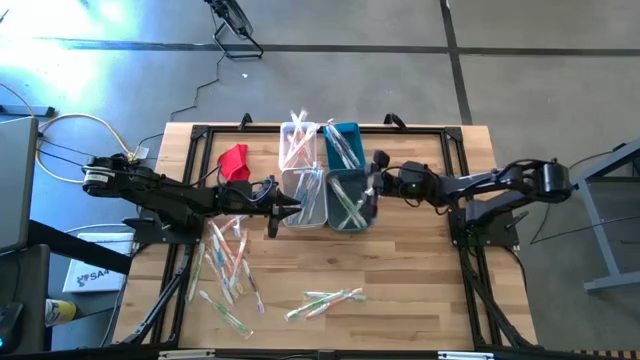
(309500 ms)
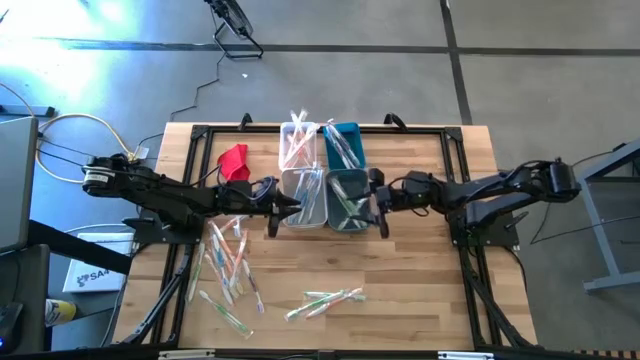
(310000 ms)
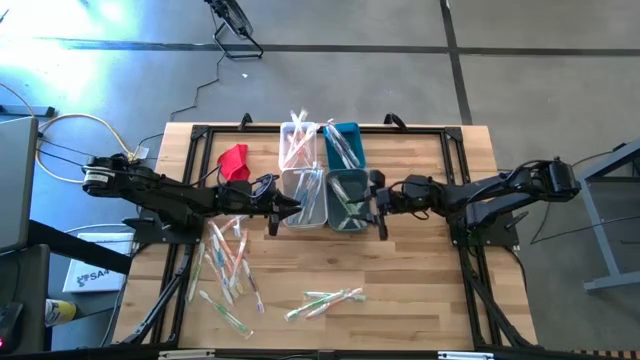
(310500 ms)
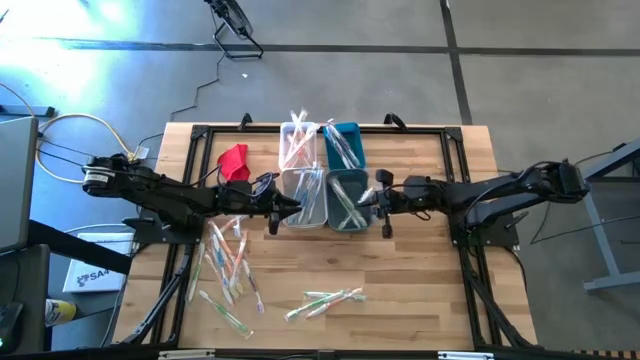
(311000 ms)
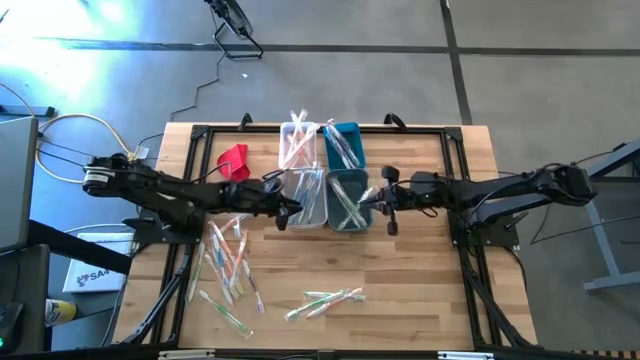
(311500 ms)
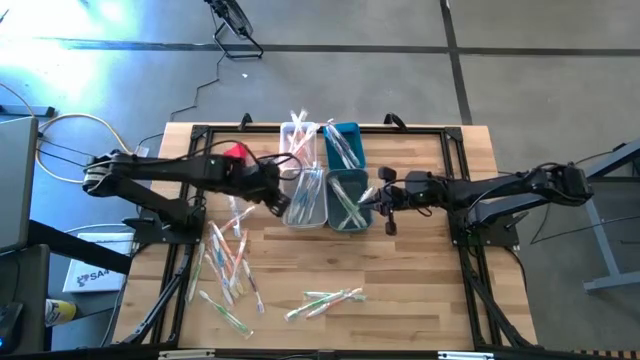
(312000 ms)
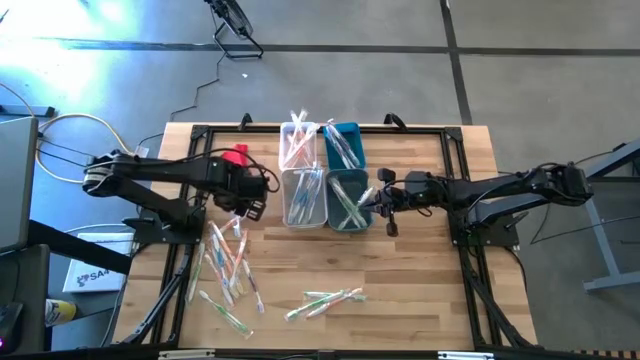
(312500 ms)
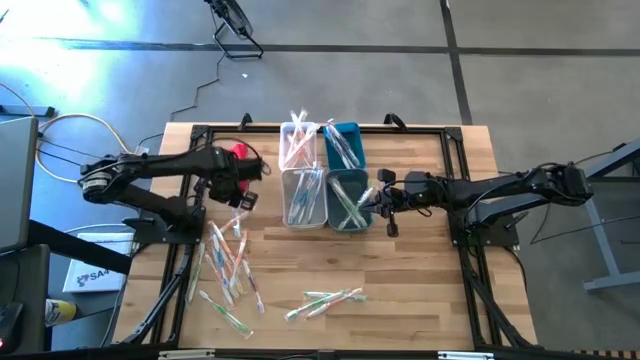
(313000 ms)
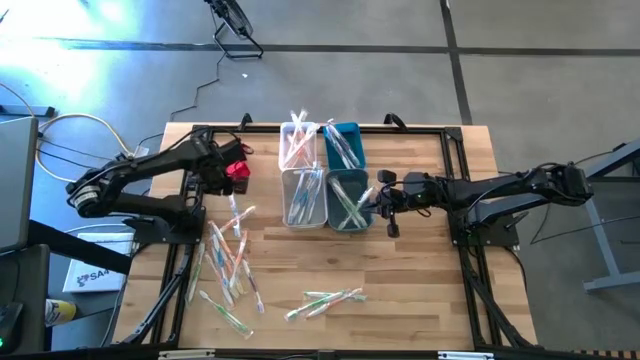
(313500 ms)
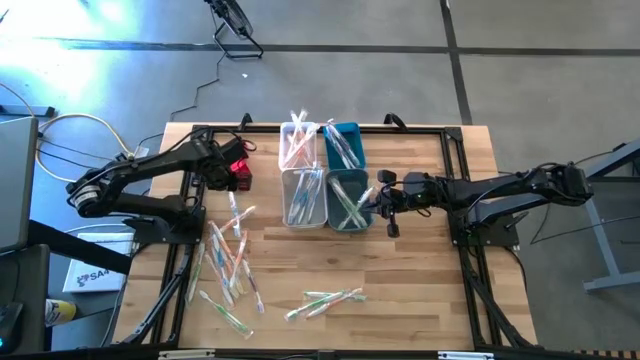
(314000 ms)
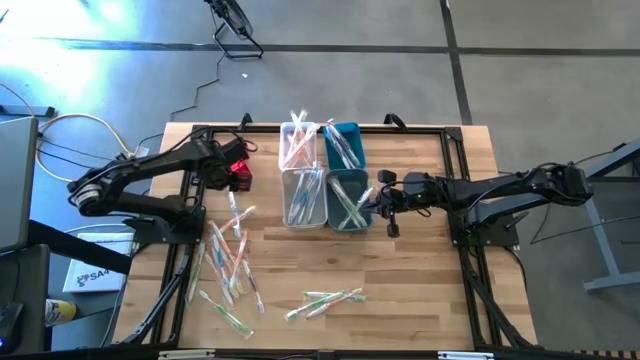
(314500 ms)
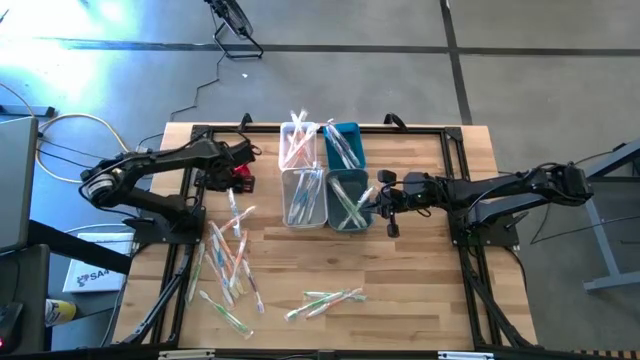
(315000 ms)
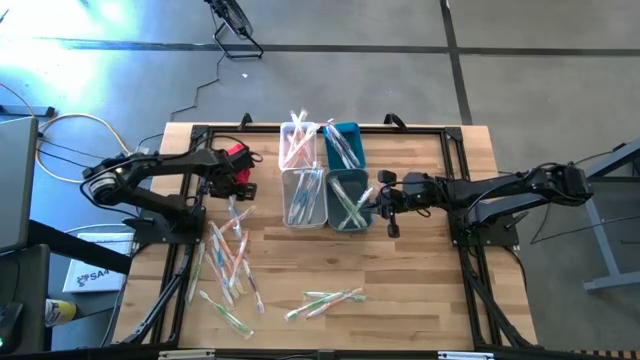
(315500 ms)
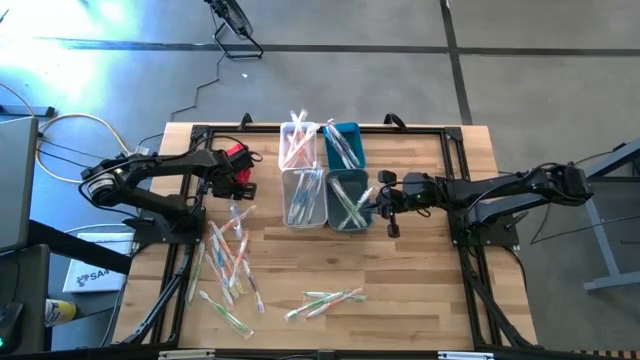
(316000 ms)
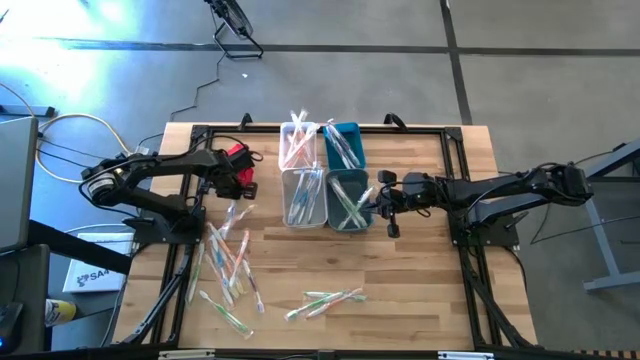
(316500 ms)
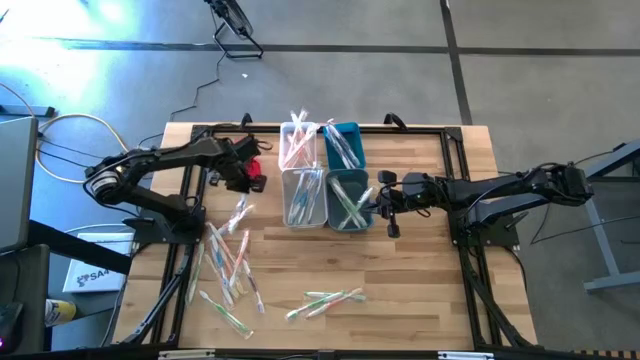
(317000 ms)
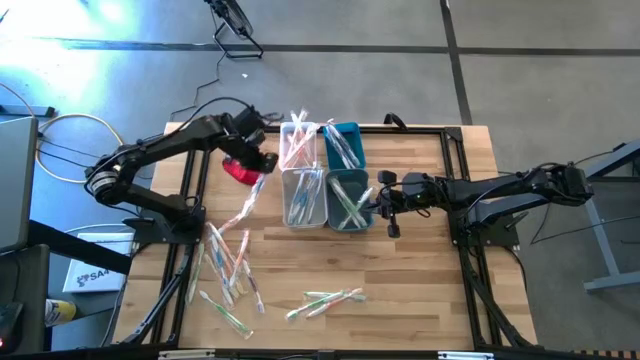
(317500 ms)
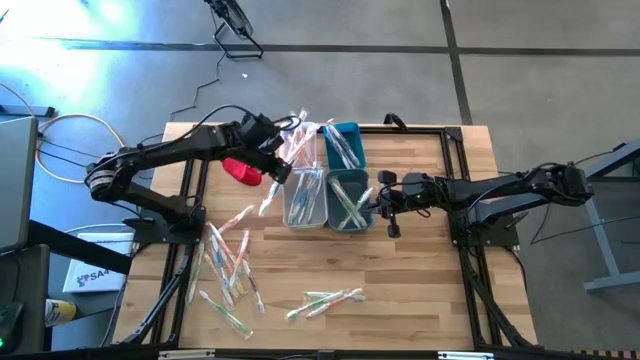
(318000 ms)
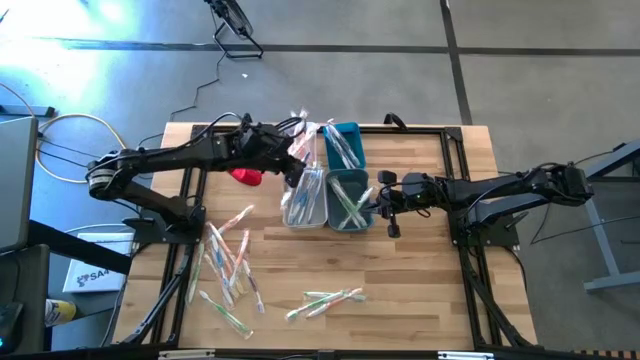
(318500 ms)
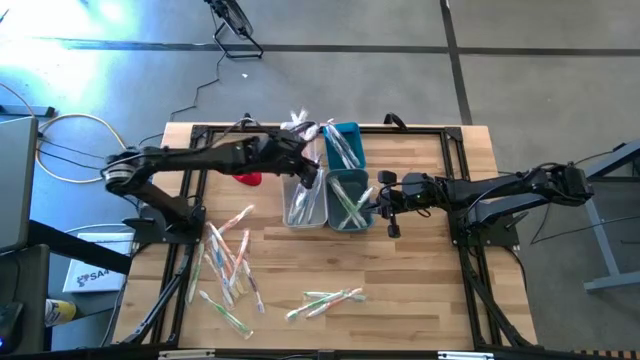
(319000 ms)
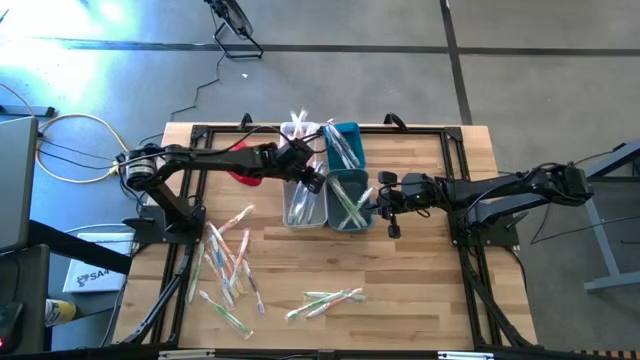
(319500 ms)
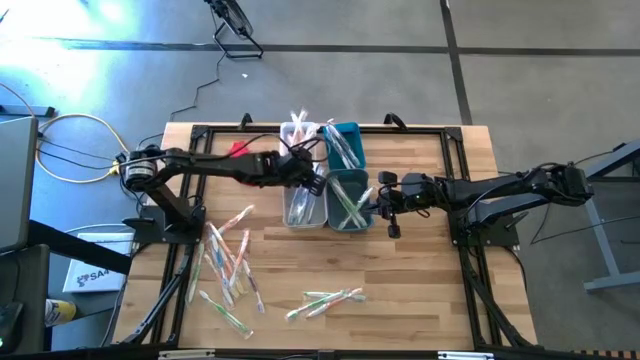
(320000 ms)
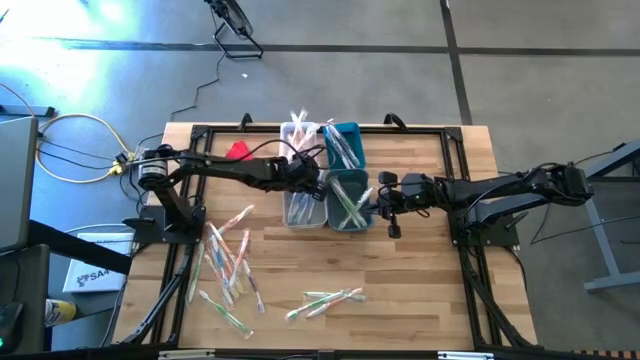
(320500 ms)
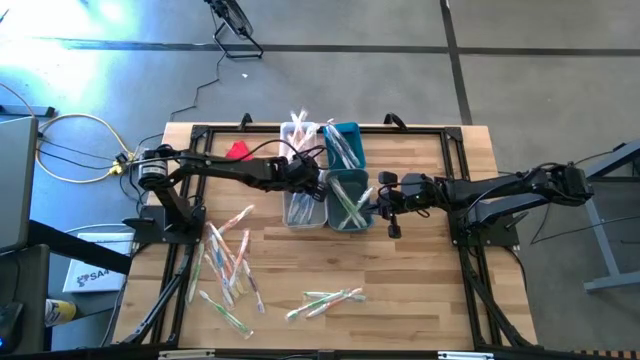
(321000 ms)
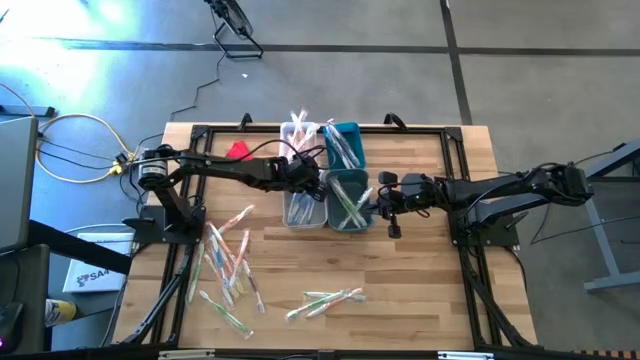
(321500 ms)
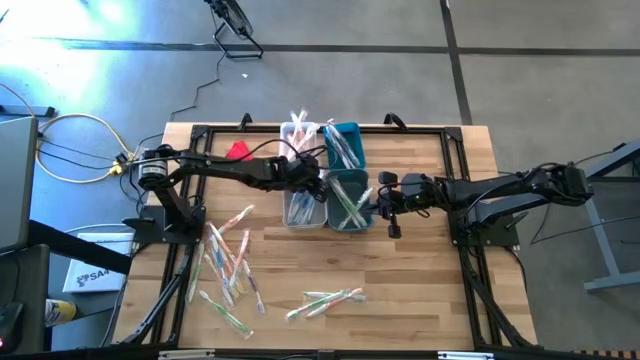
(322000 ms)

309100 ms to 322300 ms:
Task: Pick & Place Toothbrushes
Put the blue toothbrush into the blue bin

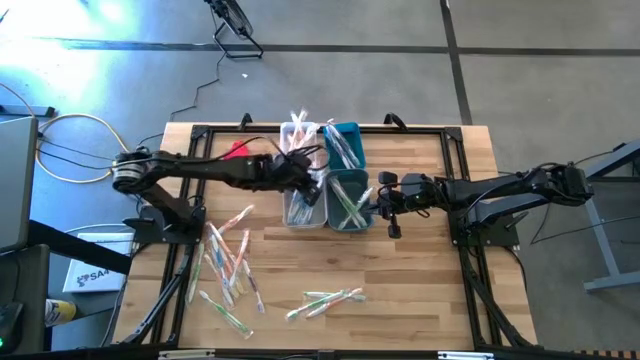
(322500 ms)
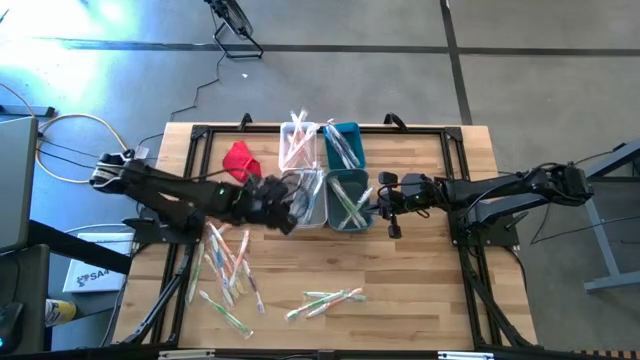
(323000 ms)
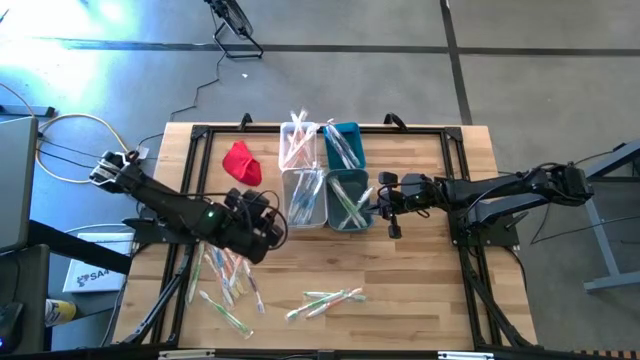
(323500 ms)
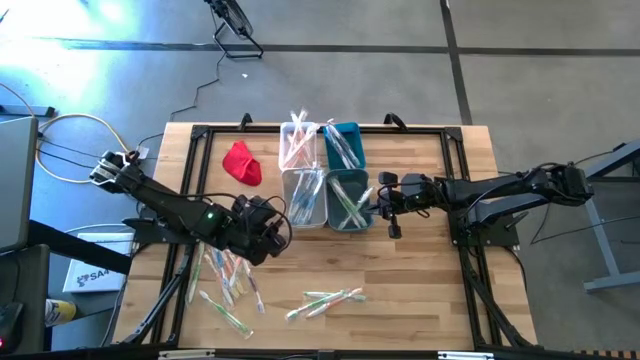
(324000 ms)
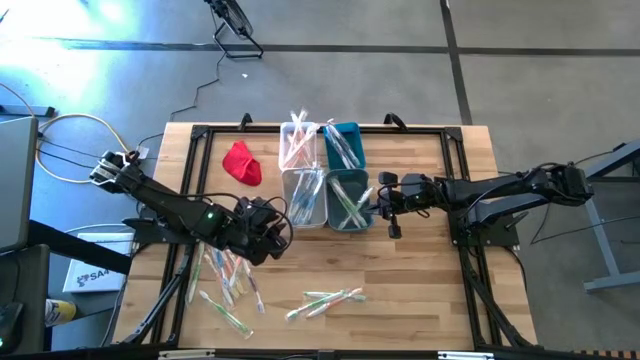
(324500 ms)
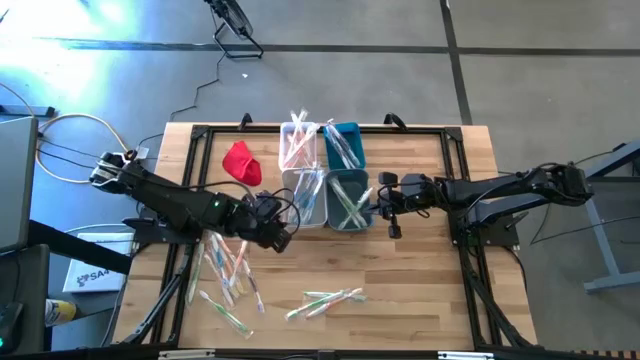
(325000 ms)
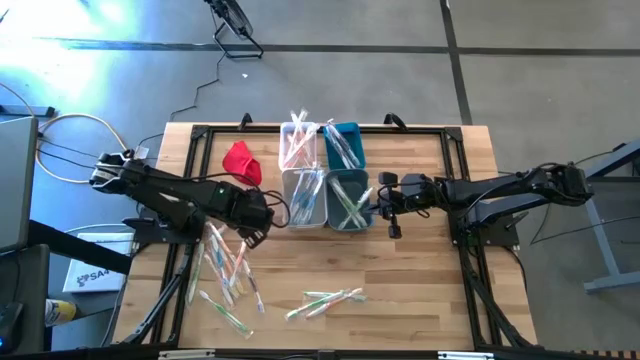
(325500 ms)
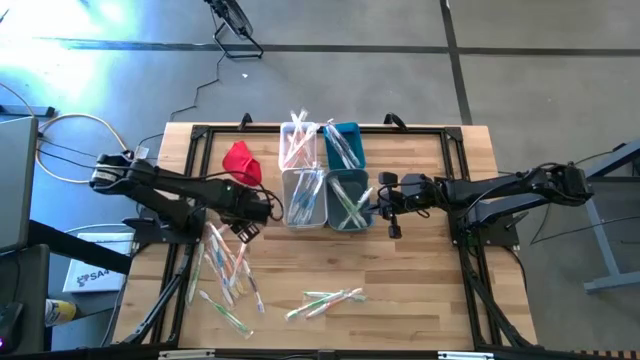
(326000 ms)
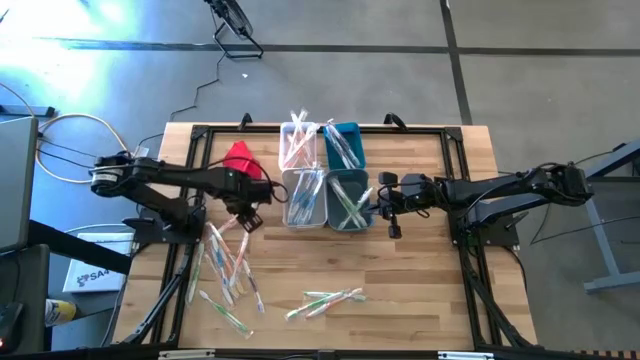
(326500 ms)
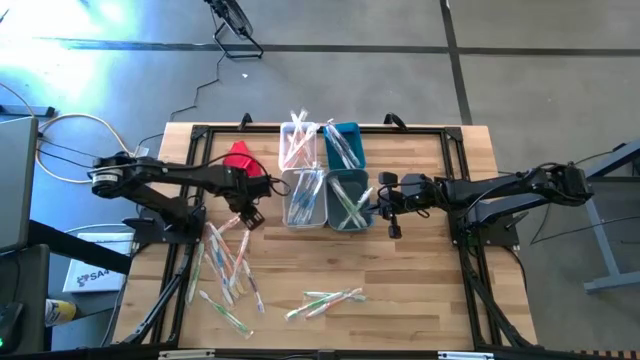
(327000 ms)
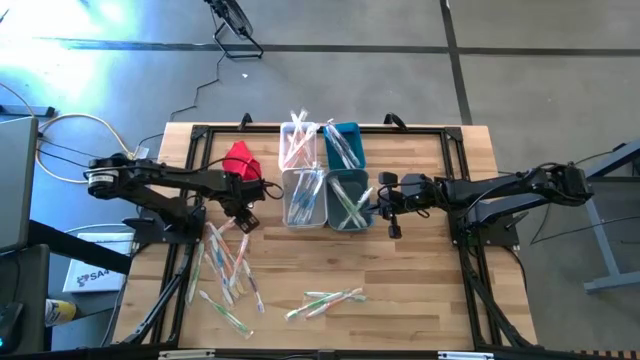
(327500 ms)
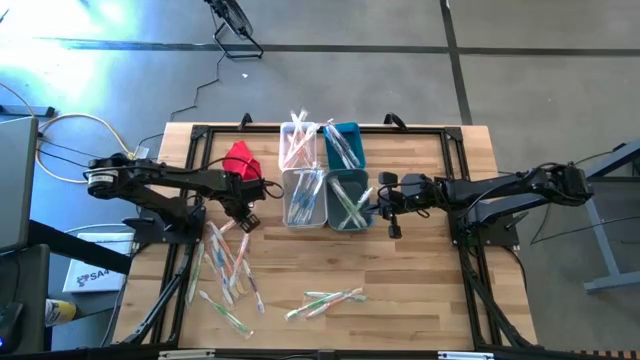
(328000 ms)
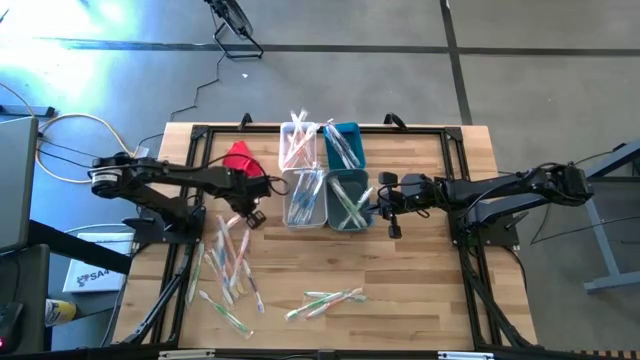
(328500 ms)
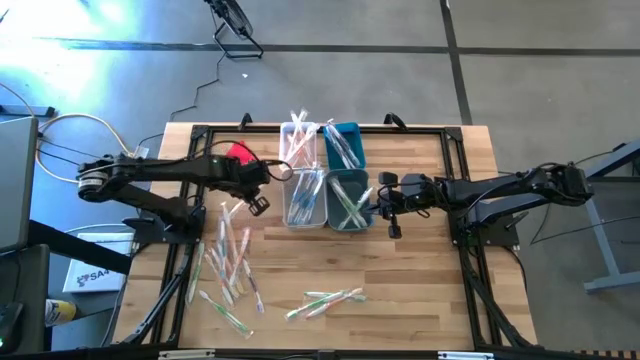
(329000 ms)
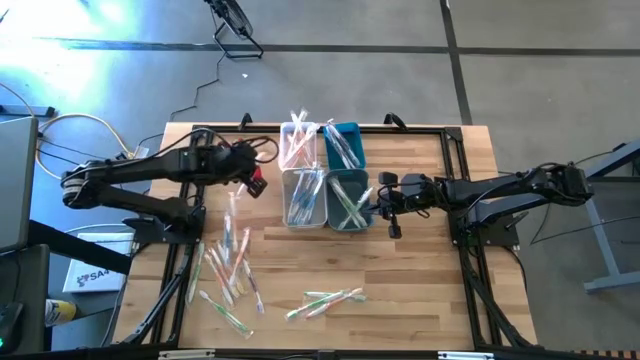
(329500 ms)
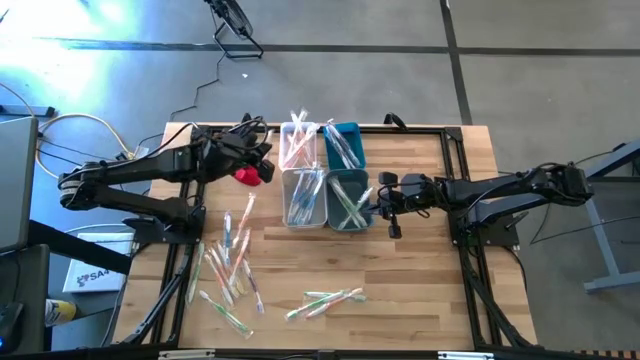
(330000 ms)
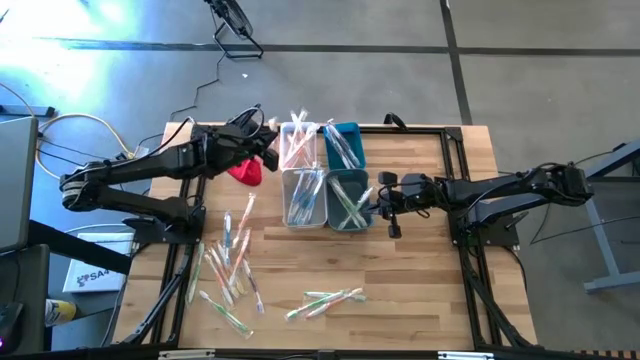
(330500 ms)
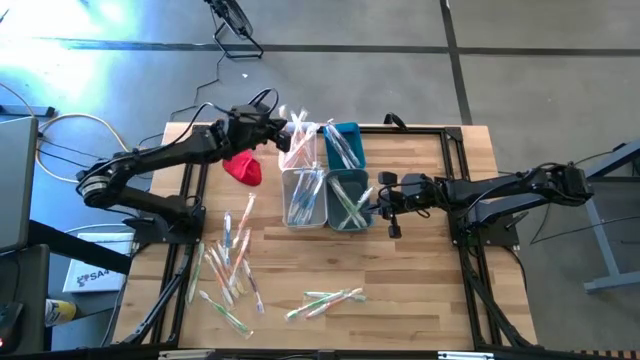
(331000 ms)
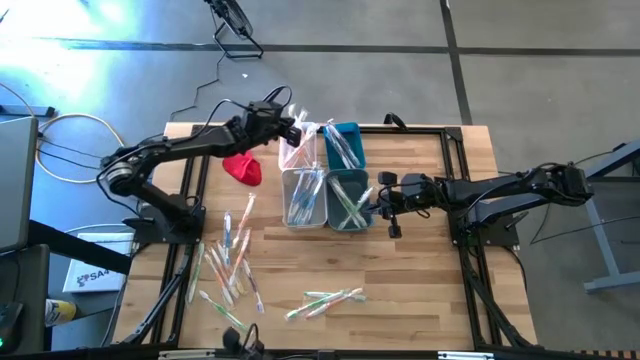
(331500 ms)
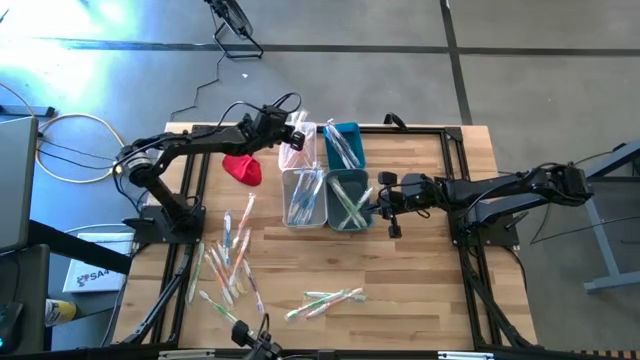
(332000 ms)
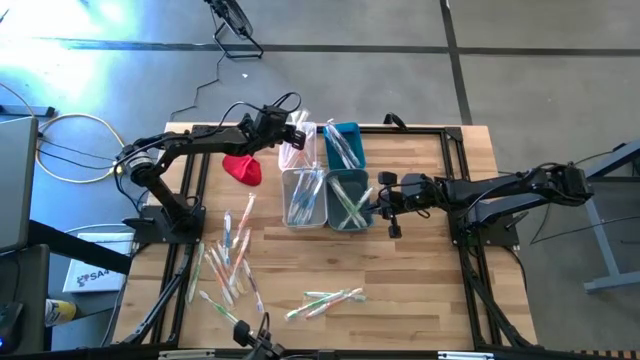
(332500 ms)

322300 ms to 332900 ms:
Put the orange toothbrush into the transparent bin
